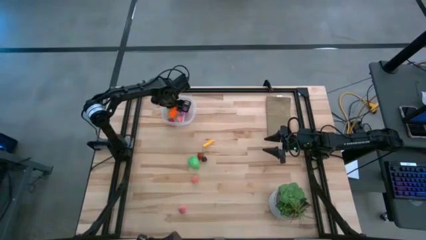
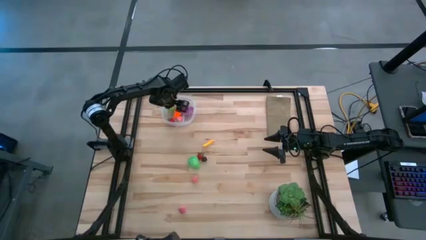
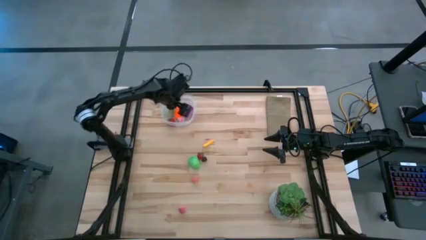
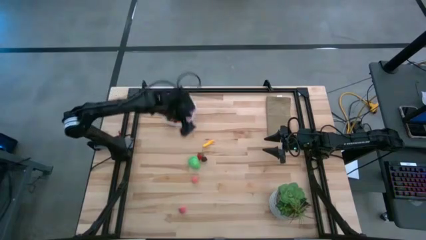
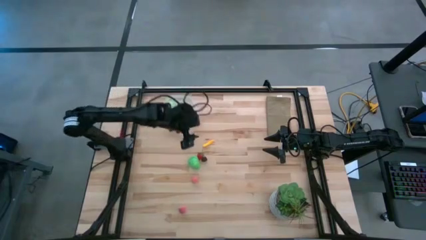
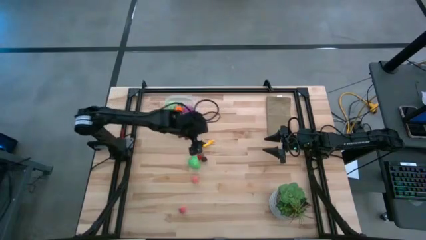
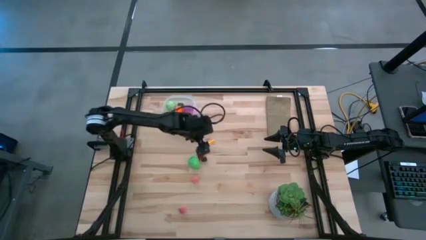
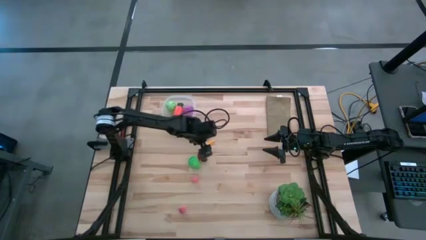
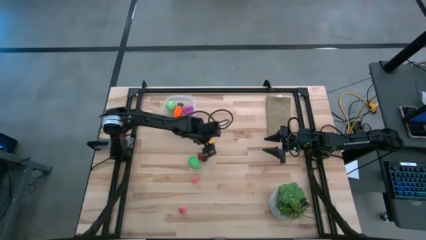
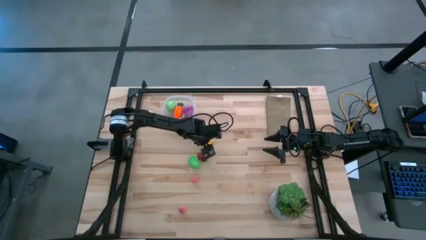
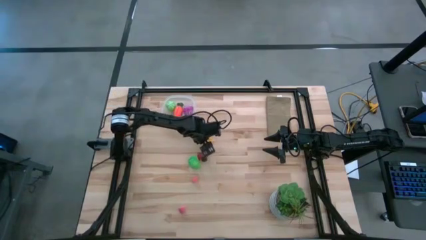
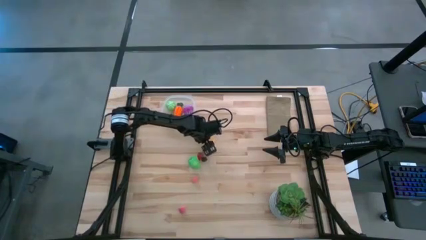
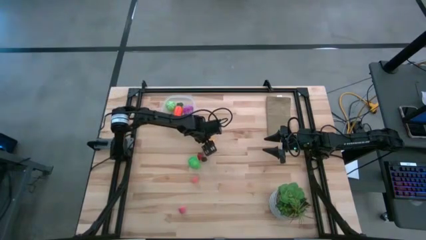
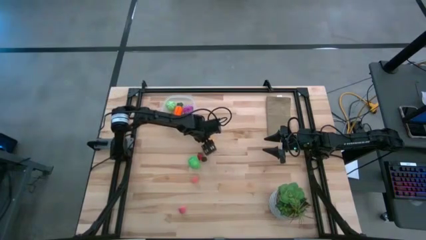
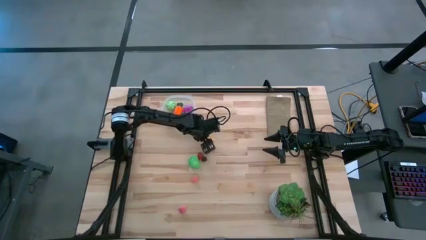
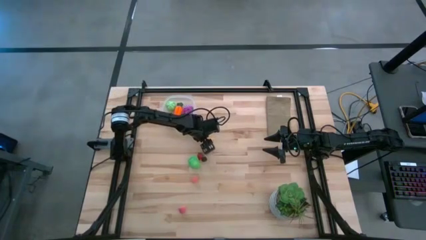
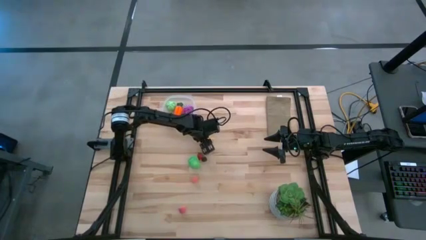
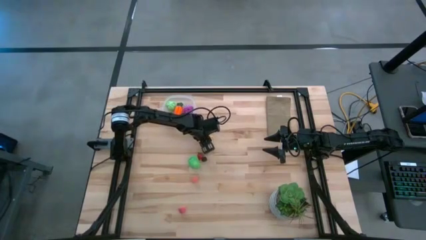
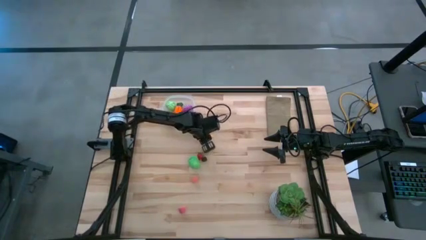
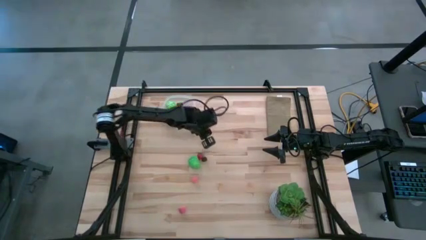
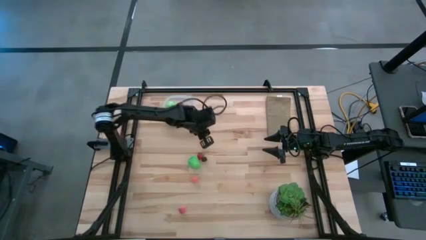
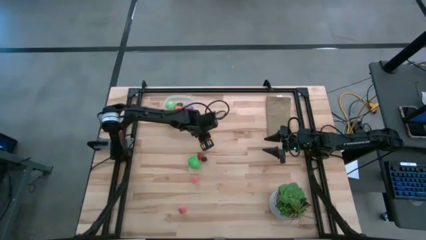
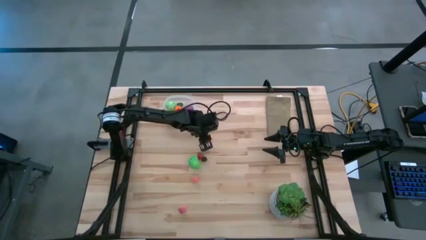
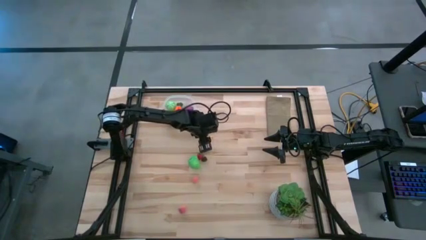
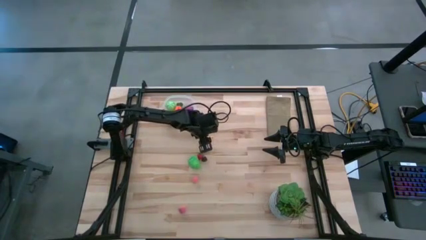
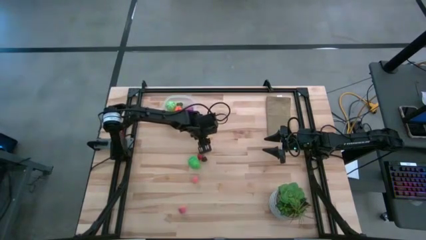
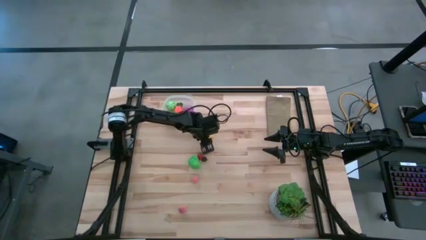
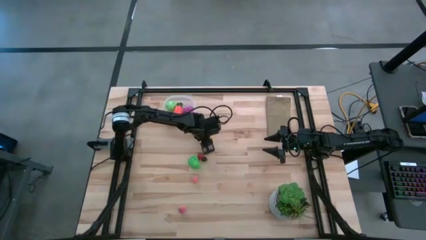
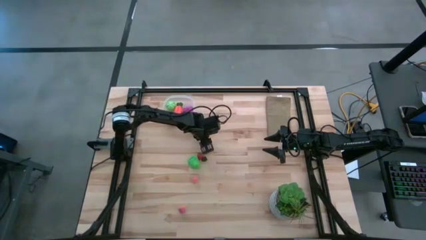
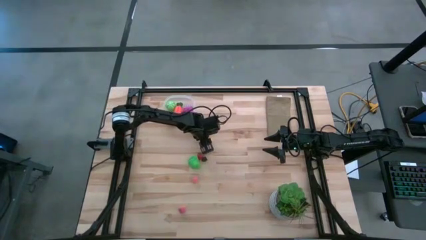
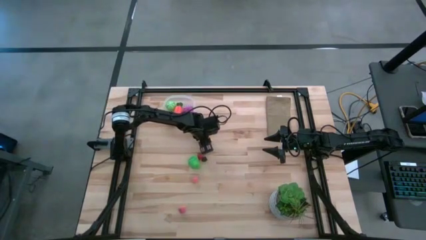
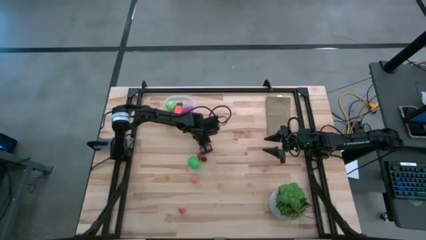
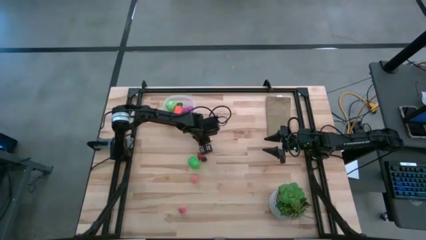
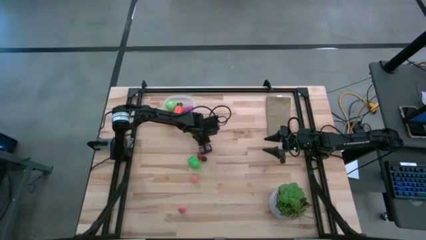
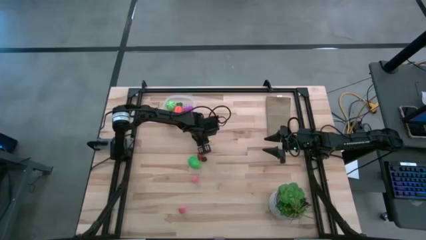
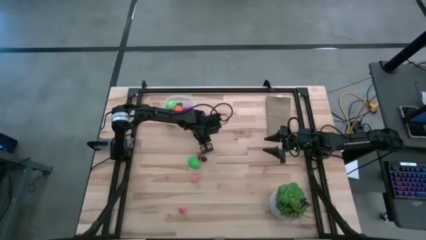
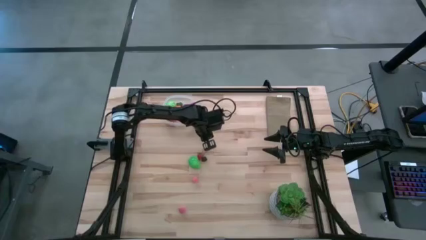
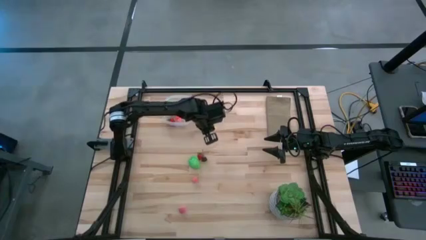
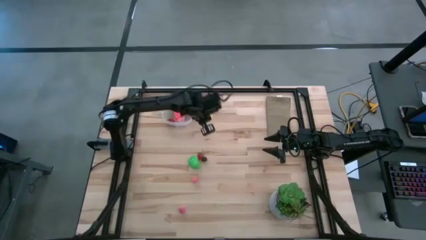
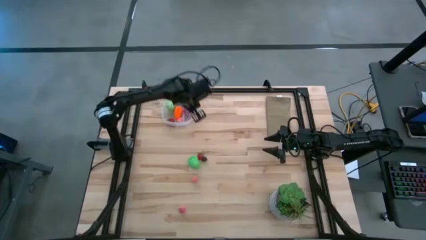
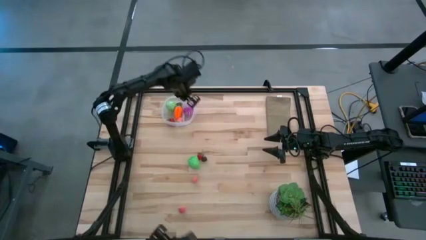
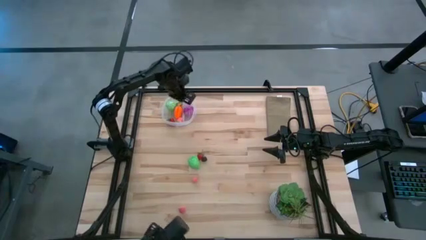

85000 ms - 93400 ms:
Task: Pick and placing Produce into tupperware
Put the yellow squash into the transparent bin

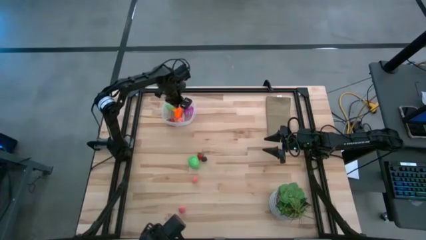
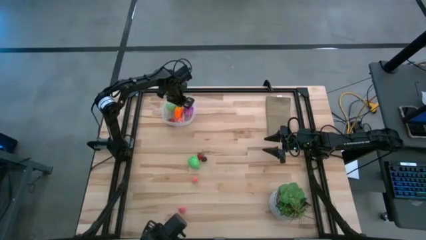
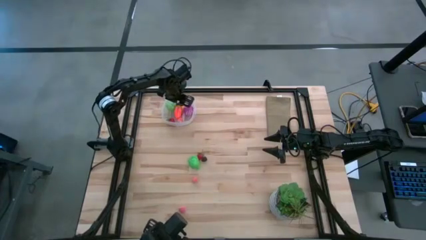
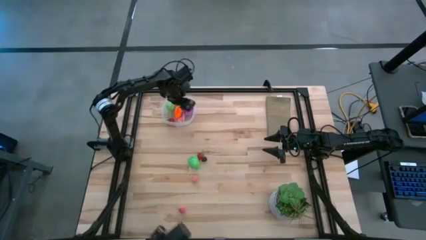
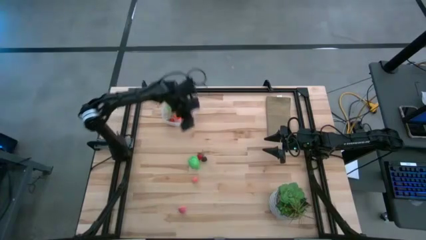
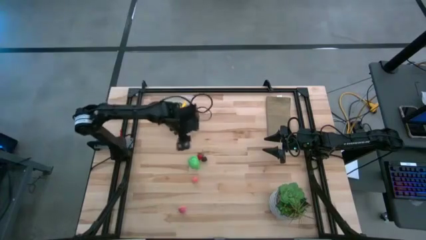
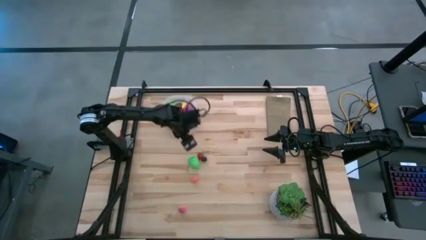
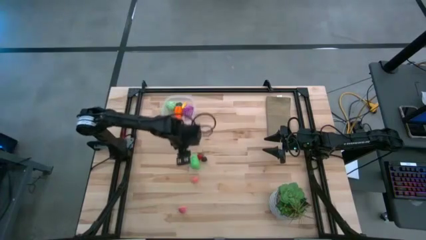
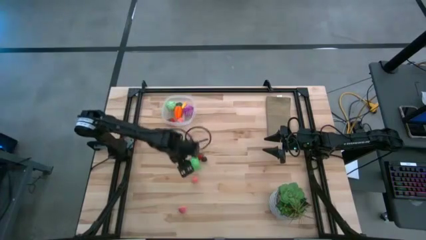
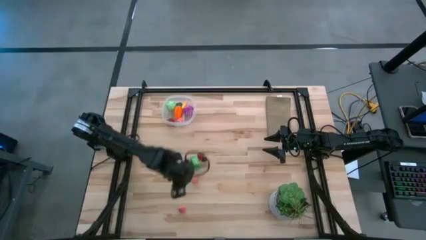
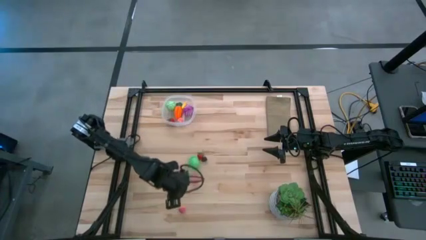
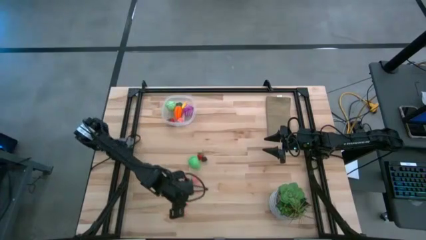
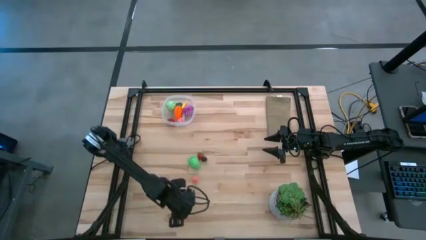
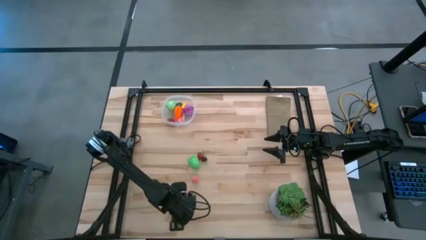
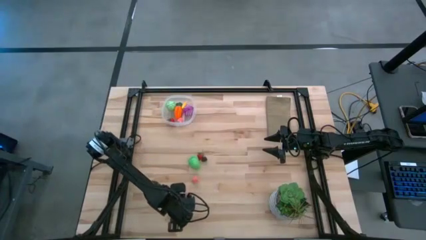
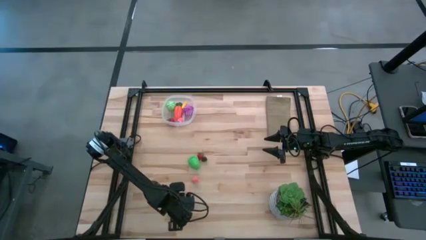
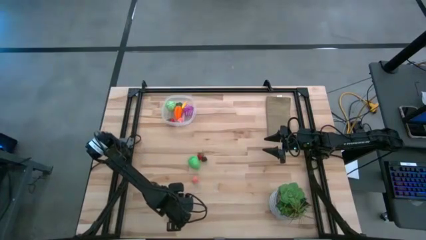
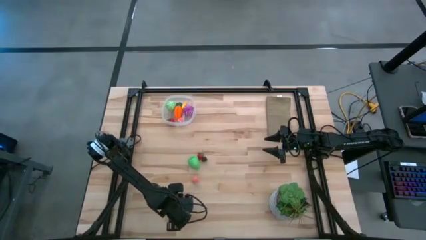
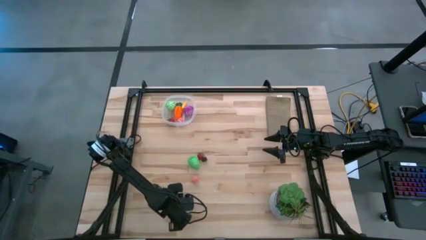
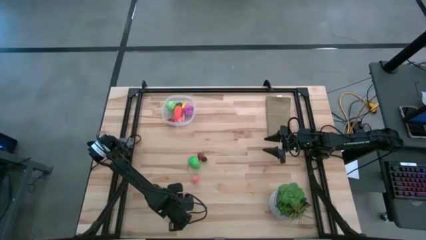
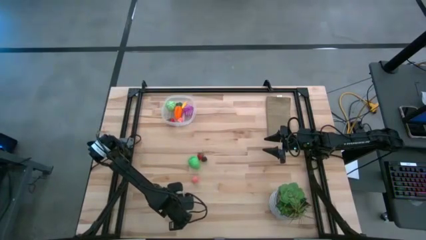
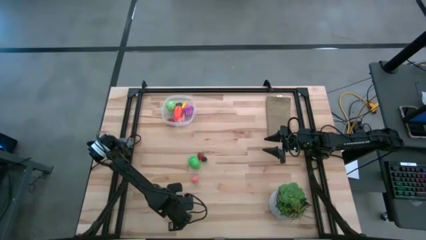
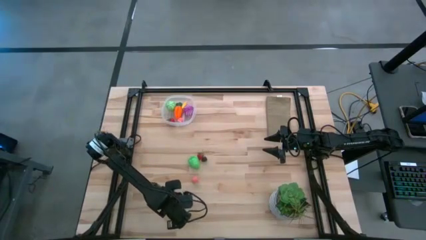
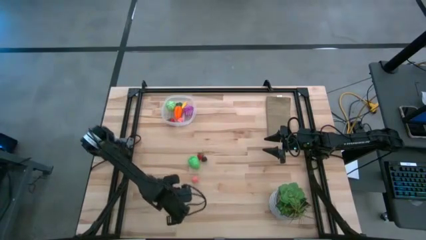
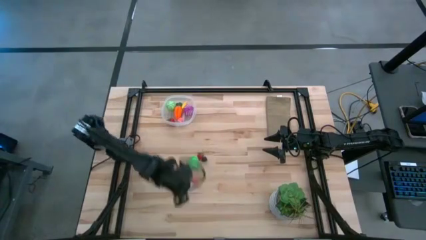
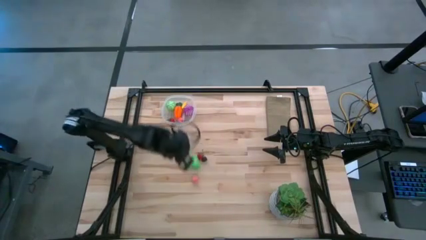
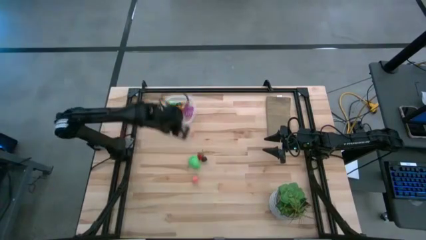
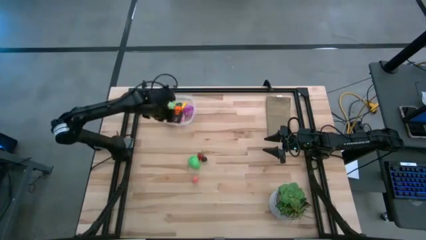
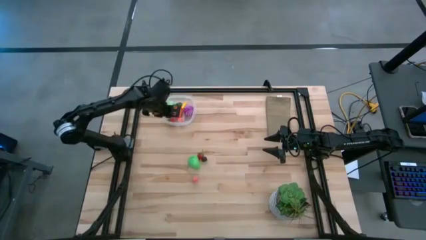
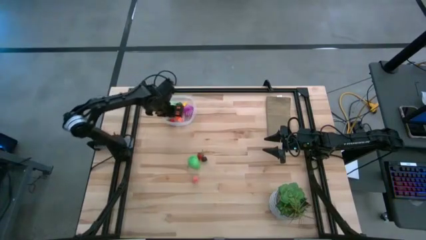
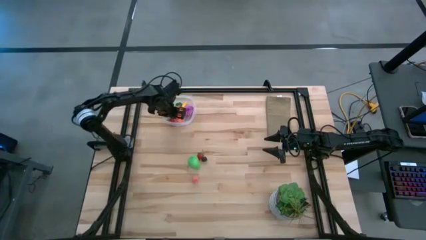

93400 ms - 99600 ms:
Put the bottom peach into the transparent bin
